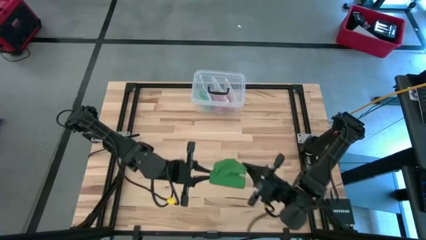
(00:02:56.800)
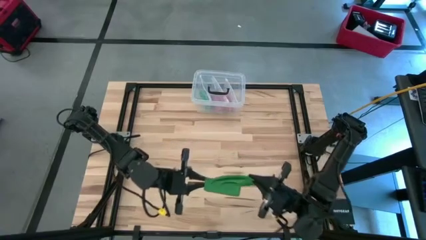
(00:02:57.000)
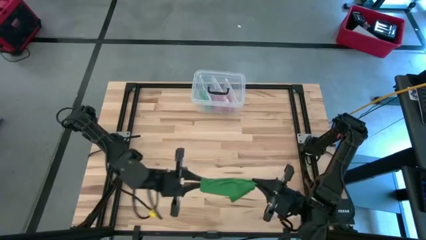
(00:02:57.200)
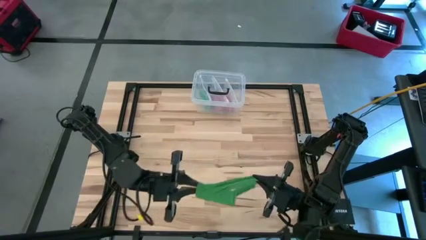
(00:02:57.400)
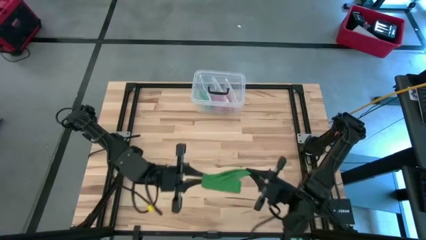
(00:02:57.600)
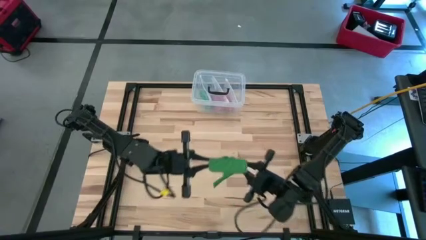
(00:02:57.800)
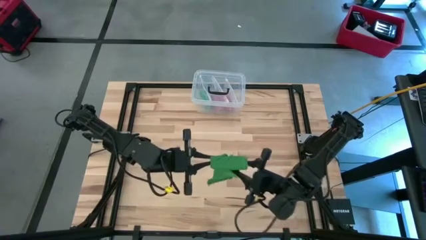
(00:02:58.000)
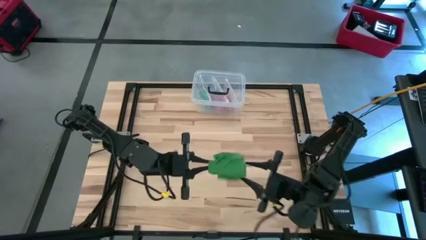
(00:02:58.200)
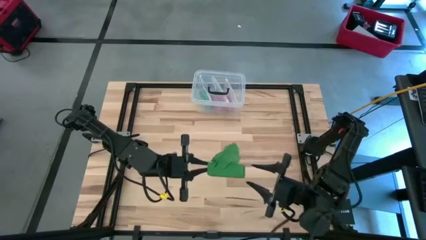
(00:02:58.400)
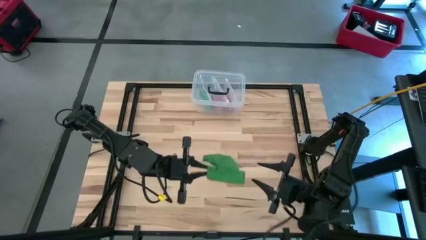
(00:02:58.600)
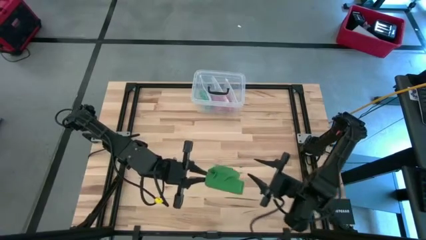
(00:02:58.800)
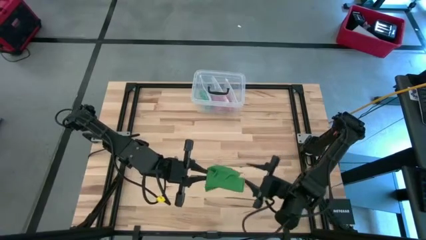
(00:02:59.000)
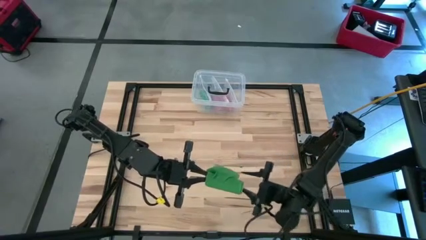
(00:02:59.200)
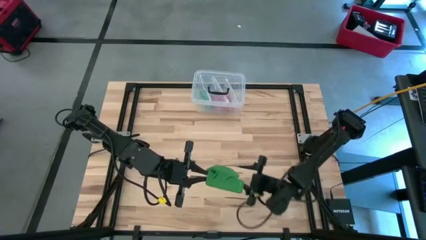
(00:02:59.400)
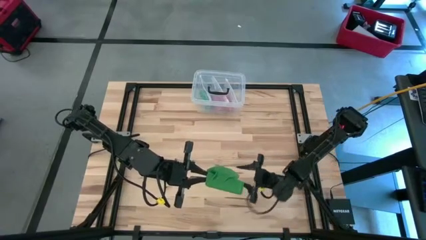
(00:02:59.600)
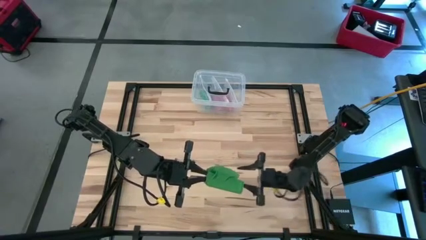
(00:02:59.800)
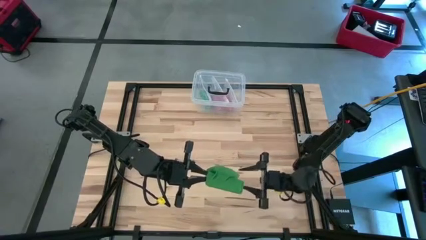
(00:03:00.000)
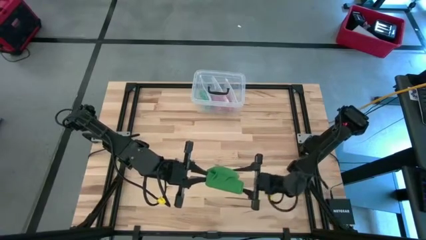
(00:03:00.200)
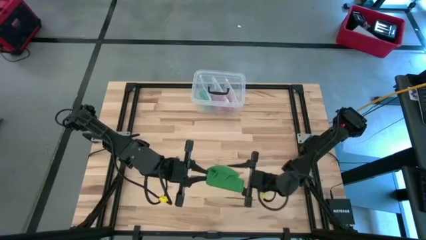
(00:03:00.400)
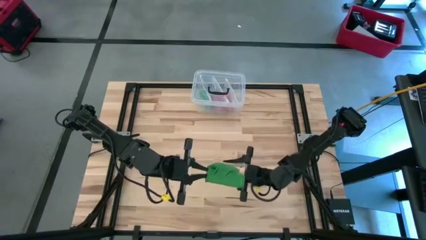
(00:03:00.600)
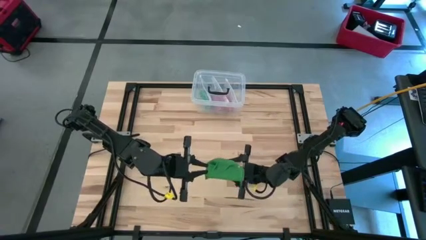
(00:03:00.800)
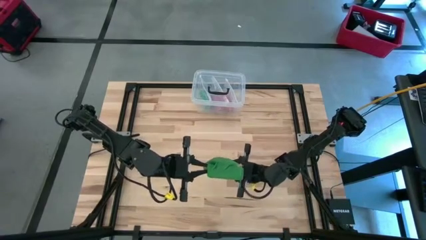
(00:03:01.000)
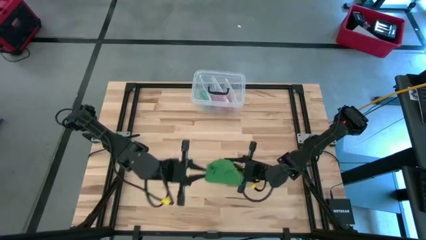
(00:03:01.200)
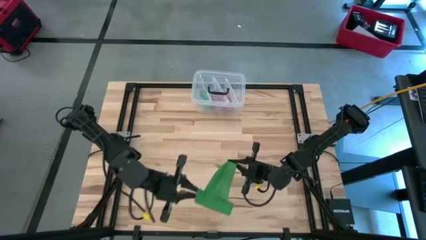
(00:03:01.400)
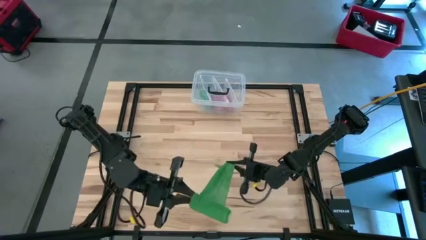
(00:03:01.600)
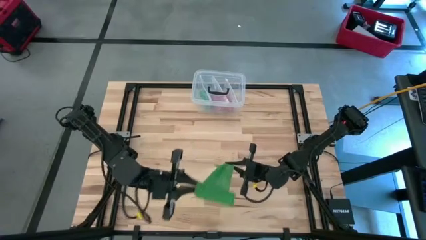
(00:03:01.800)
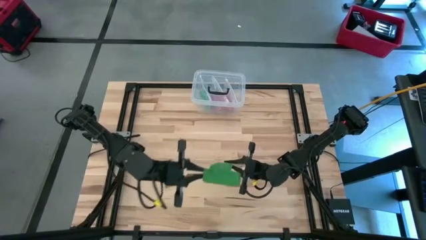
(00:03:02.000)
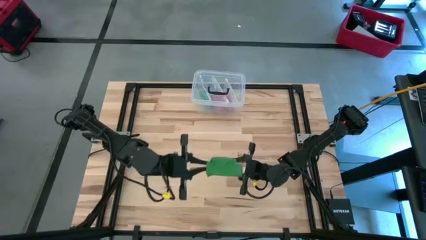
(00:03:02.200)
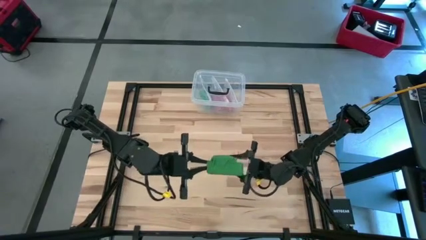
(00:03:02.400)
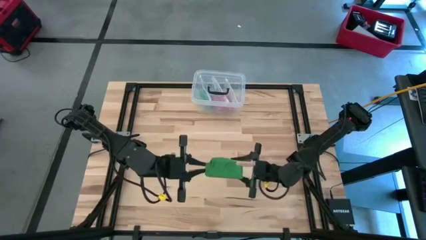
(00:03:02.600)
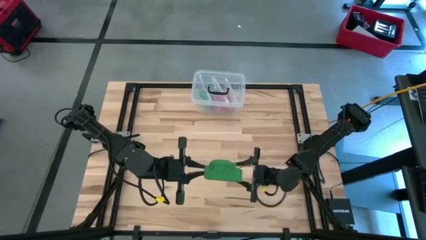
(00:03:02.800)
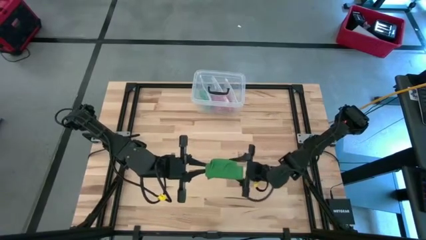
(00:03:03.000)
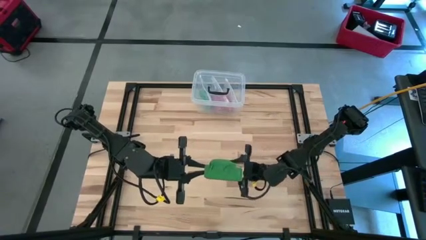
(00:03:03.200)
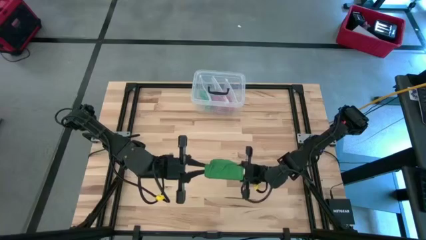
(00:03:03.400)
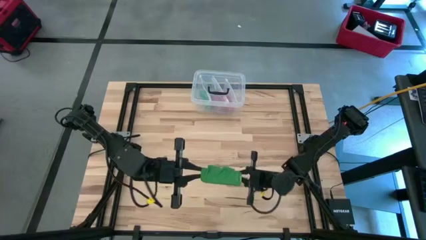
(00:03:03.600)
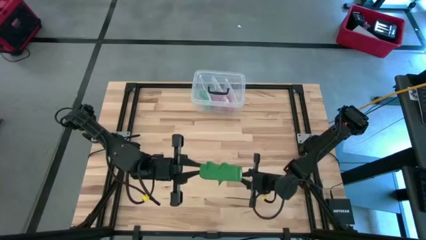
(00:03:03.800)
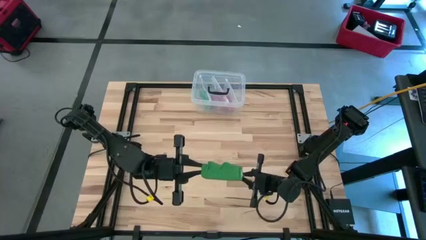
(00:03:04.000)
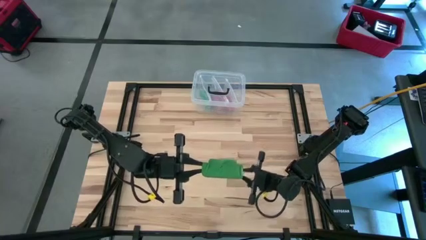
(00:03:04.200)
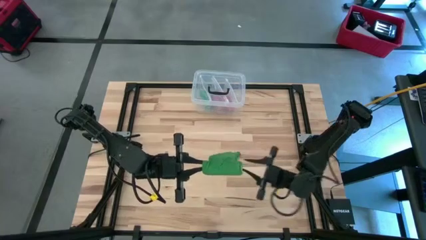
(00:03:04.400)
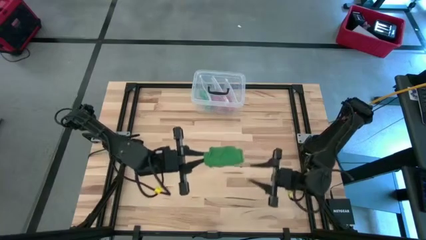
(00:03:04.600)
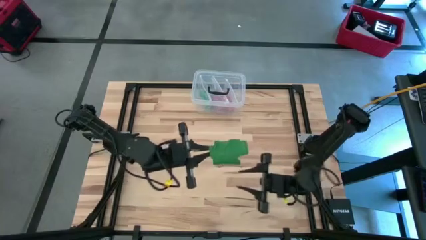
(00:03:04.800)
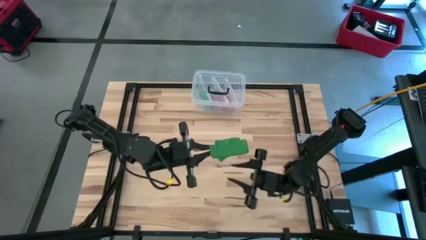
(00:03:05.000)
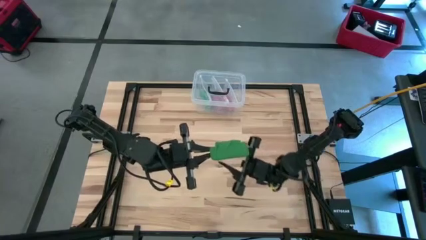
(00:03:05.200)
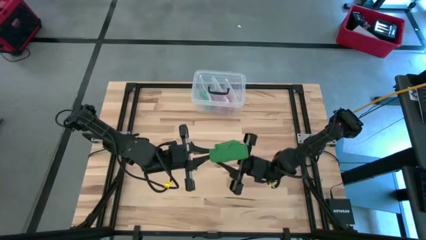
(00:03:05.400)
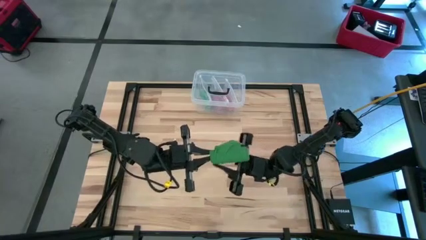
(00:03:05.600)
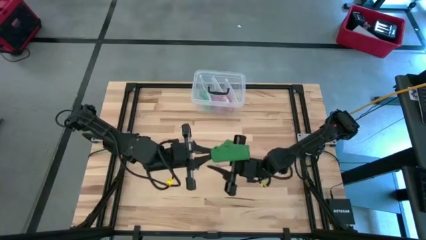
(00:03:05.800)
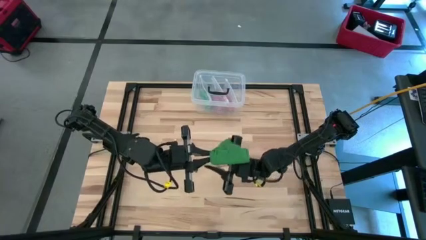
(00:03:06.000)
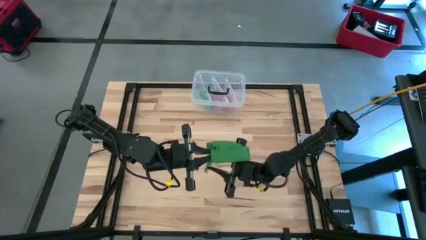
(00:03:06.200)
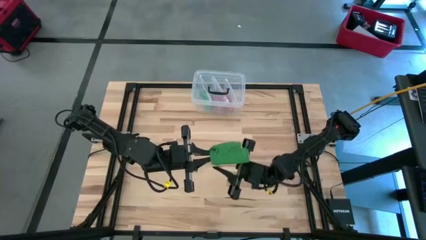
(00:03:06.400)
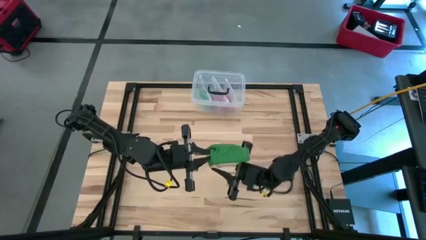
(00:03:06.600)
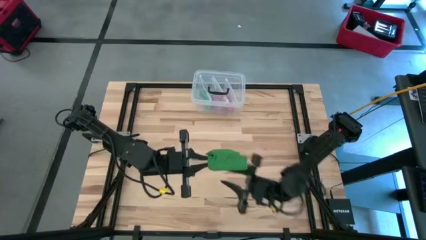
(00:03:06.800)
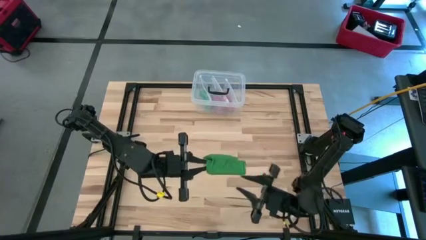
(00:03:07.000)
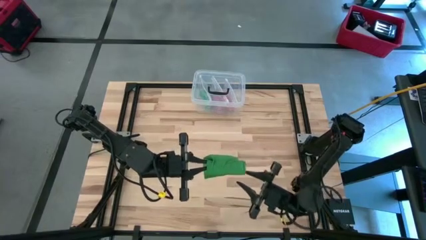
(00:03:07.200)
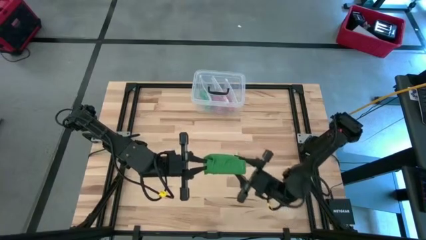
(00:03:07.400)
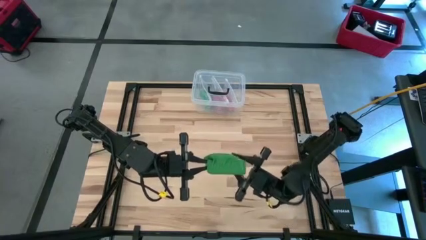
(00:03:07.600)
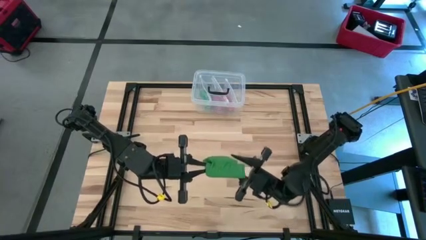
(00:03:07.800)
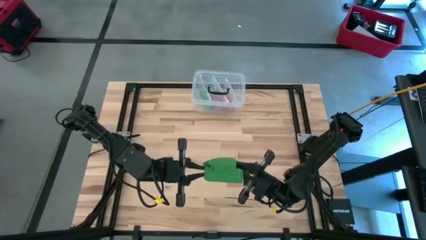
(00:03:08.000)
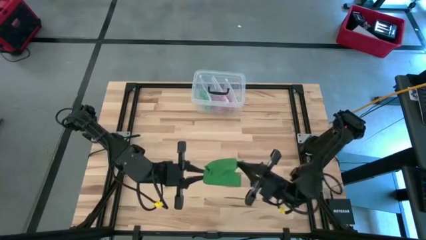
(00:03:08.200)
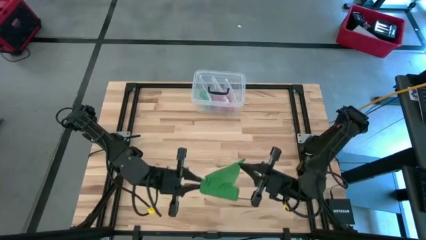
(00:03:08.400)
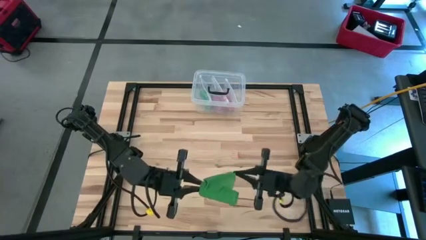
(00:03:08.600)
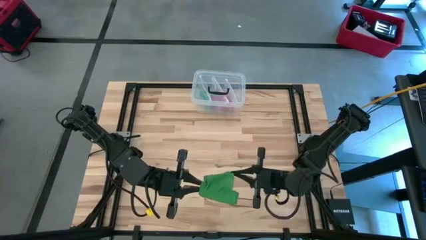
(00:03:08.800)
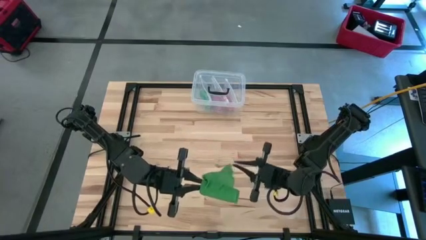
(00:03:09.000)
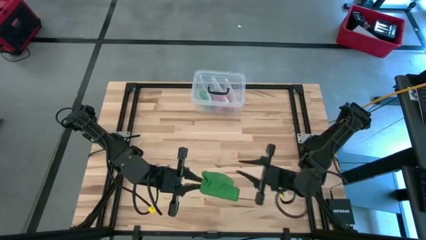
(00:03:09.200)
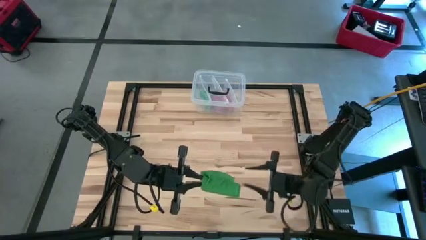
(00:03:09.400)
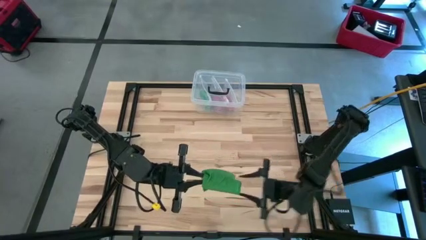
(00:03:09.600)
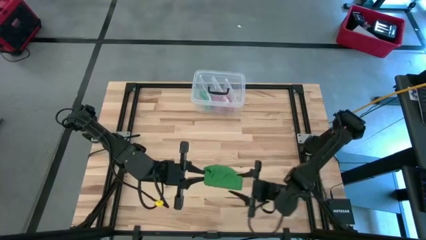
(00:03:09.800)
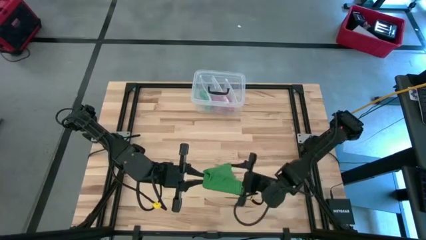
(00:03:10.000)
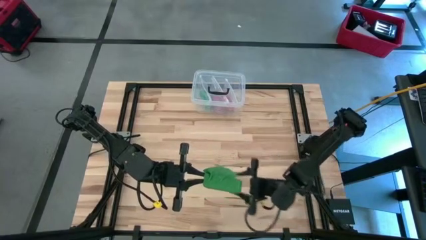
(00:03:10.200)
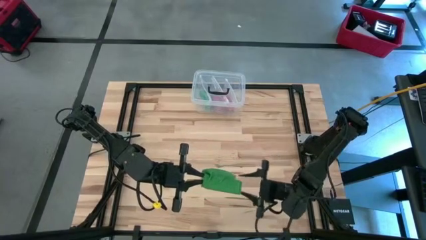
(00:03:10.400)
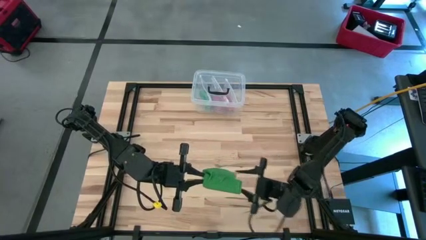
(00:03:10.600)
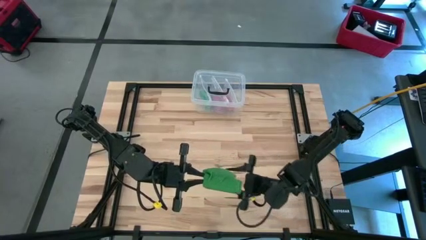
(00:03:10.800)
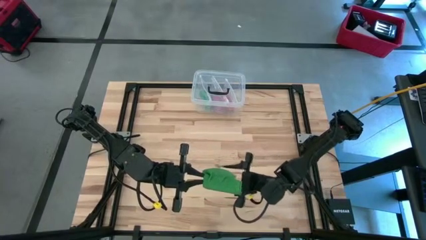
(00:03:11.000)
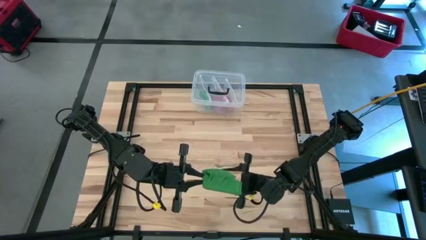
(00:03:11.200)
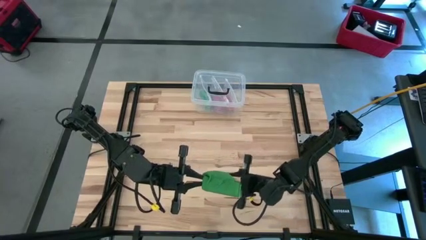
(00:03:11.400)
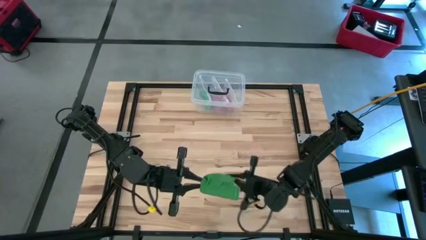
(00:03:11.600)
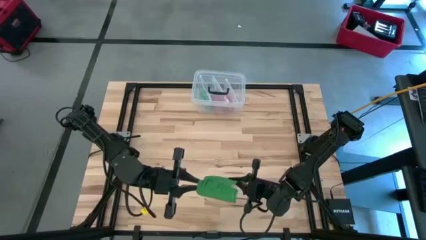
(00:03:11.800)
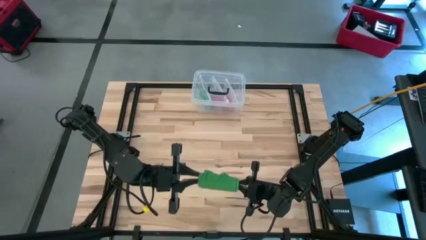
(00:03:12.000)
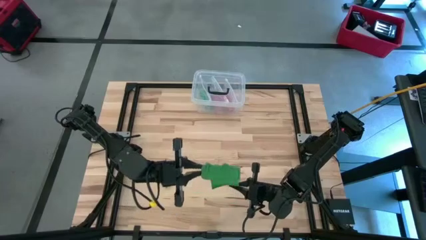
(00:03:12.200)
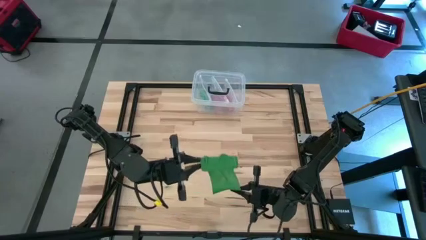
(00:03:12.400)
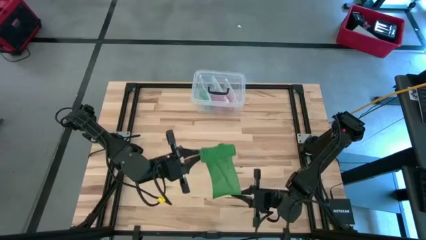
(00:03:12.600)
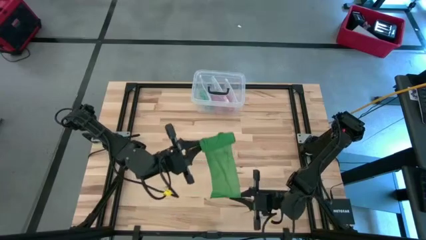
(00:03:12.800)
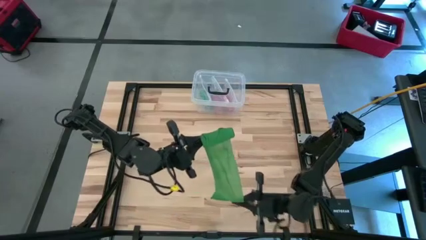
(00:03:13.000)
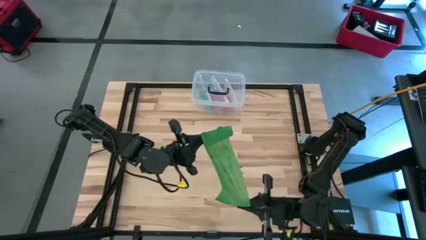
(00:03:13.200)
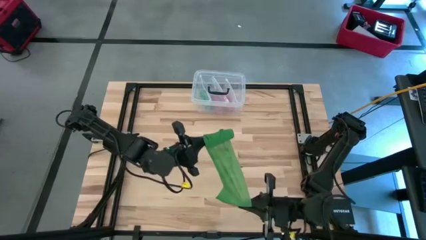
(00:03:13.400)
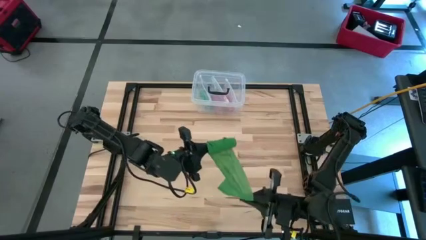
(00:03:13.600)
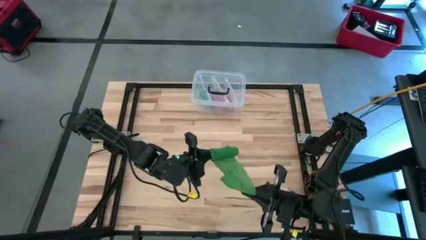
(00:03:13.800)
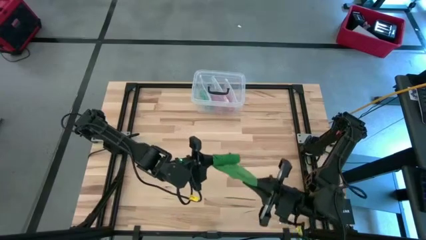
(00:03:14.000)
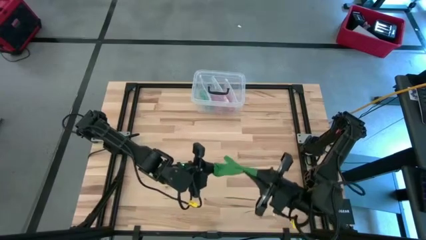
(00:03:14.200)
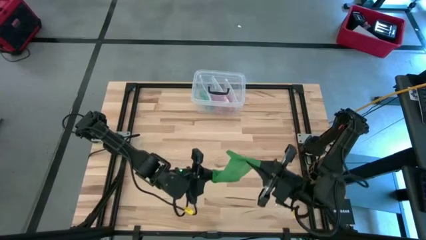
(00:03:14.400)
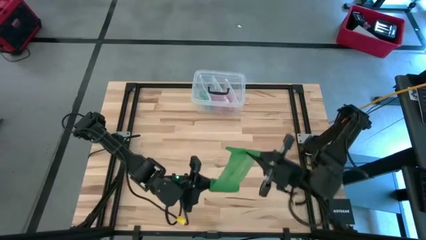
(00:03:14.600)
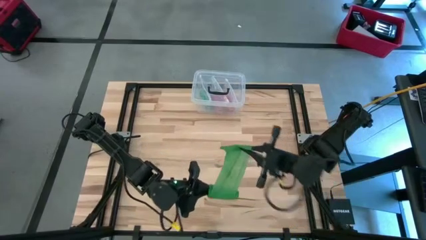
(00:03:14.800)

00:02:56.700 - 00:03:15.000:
Task: Roll bandage
Roll the green bandage
